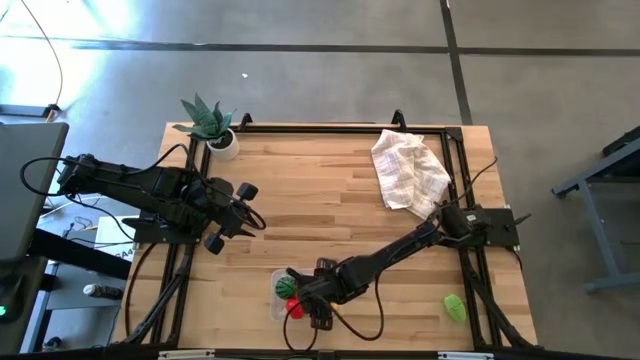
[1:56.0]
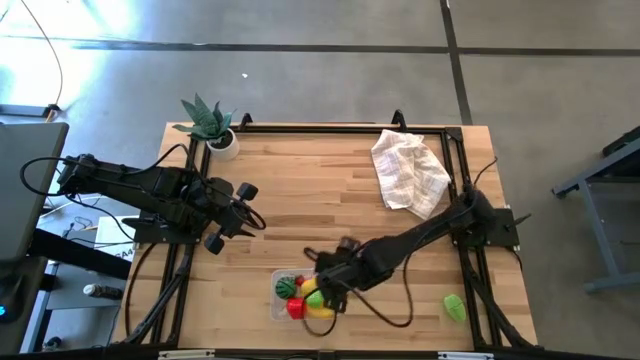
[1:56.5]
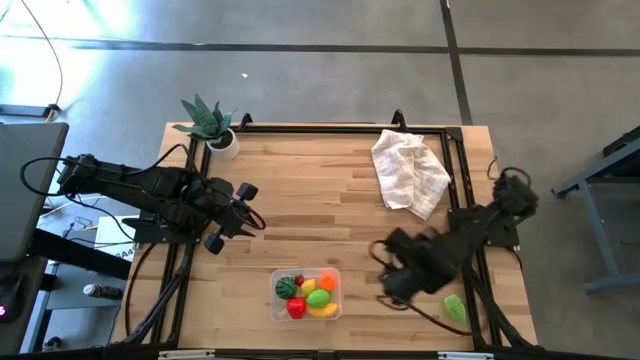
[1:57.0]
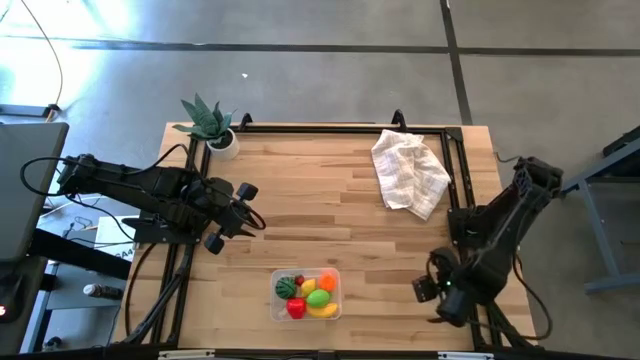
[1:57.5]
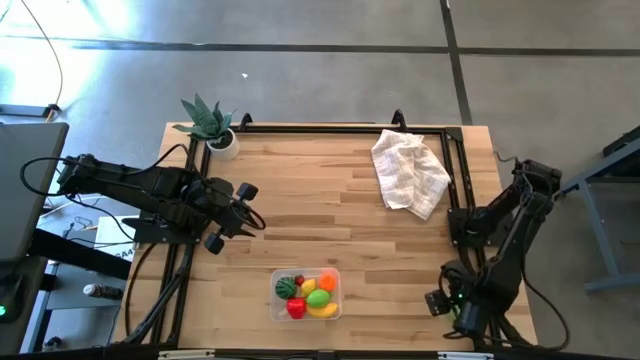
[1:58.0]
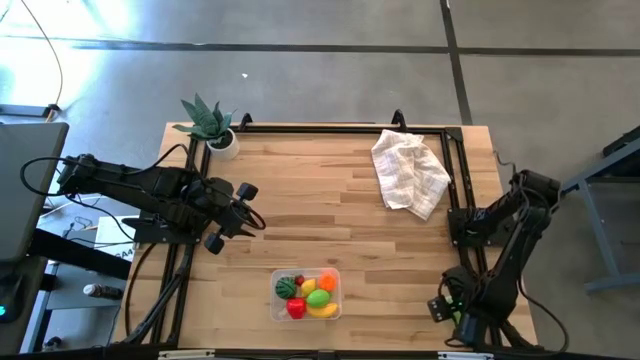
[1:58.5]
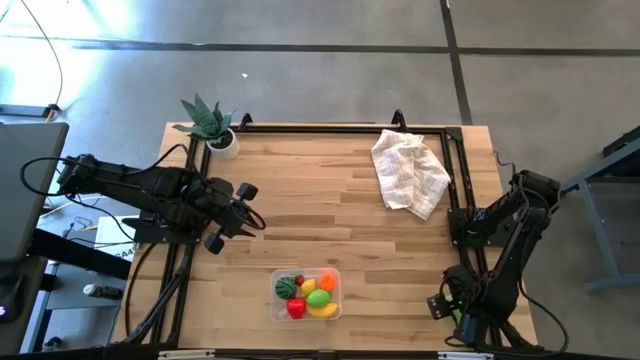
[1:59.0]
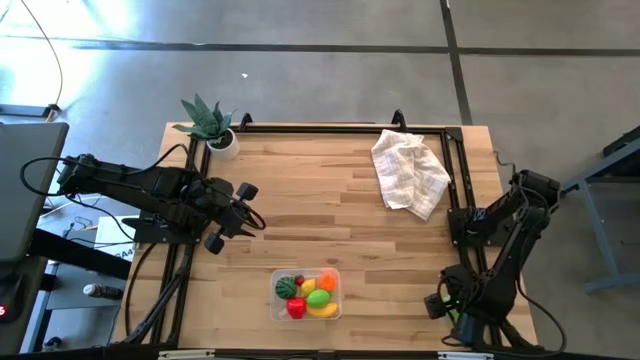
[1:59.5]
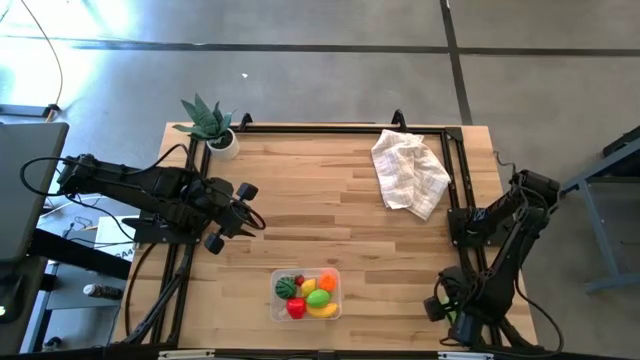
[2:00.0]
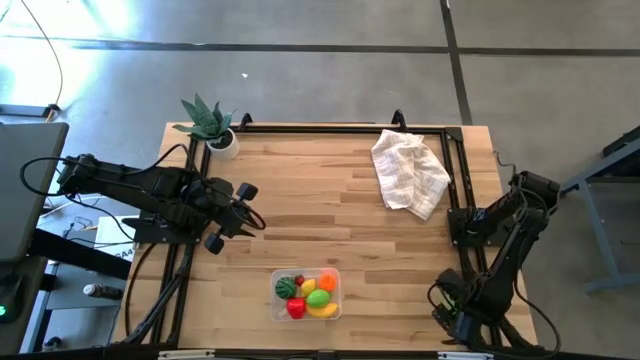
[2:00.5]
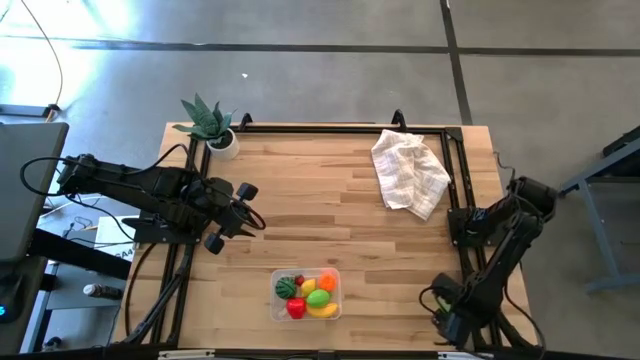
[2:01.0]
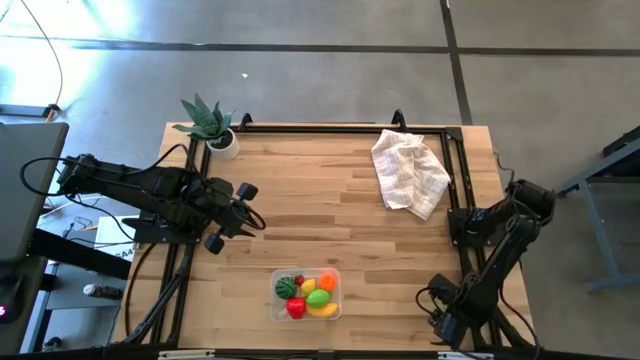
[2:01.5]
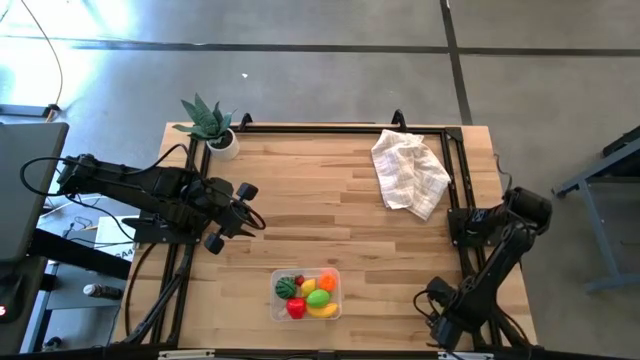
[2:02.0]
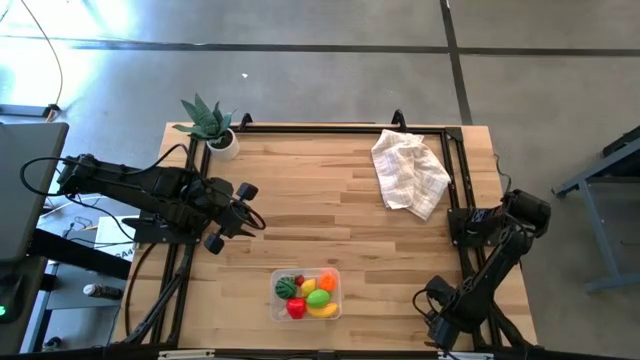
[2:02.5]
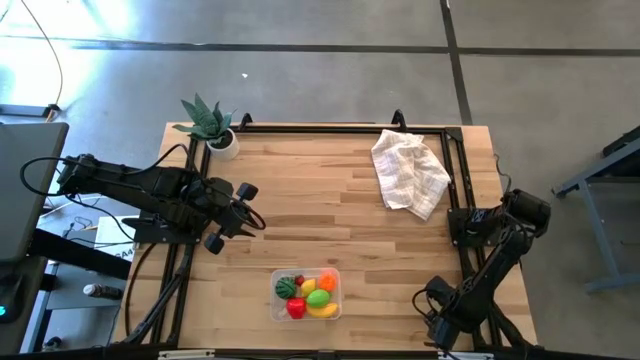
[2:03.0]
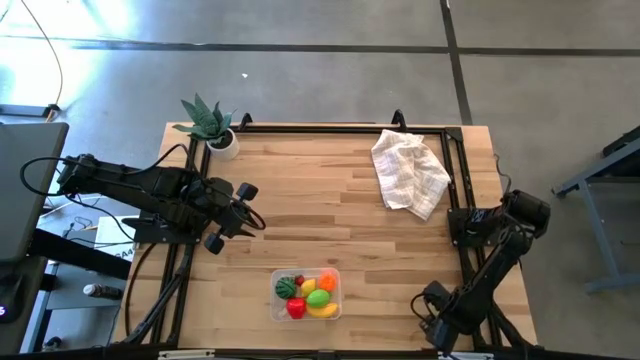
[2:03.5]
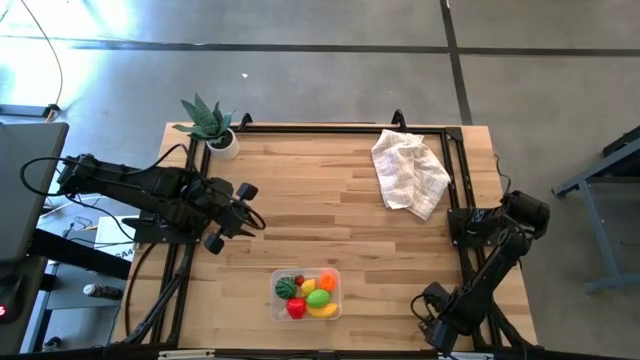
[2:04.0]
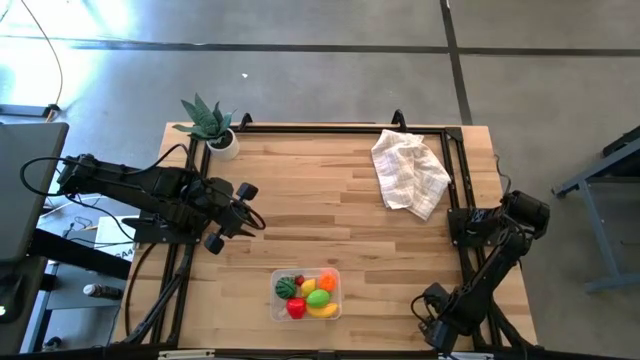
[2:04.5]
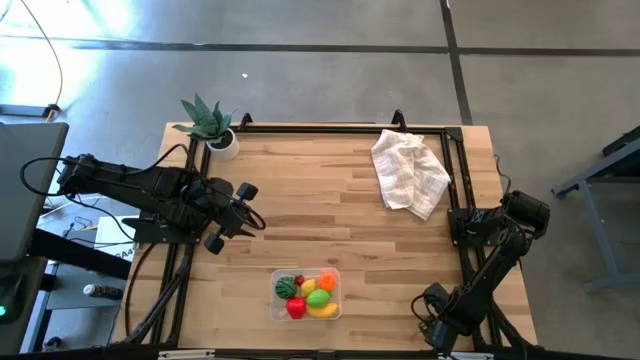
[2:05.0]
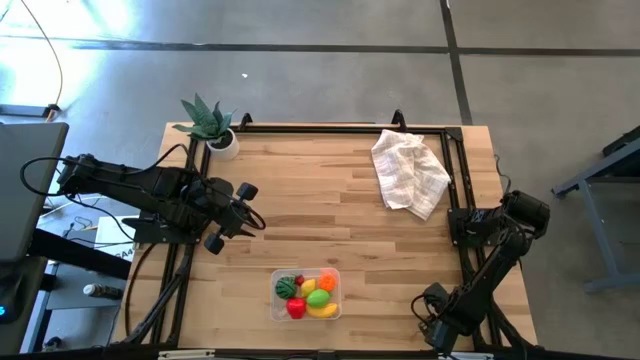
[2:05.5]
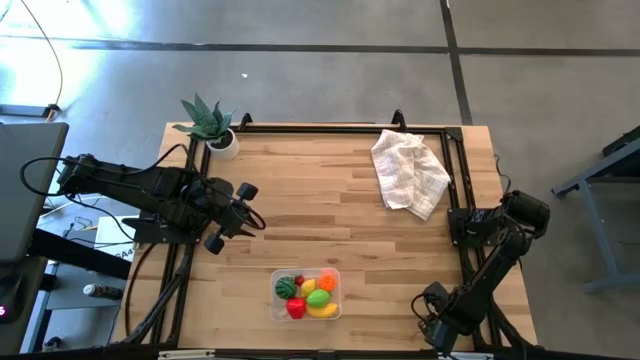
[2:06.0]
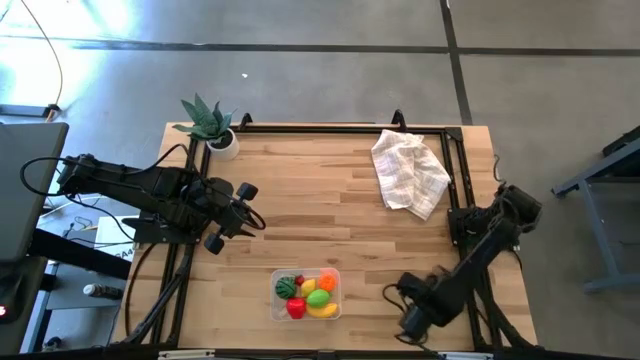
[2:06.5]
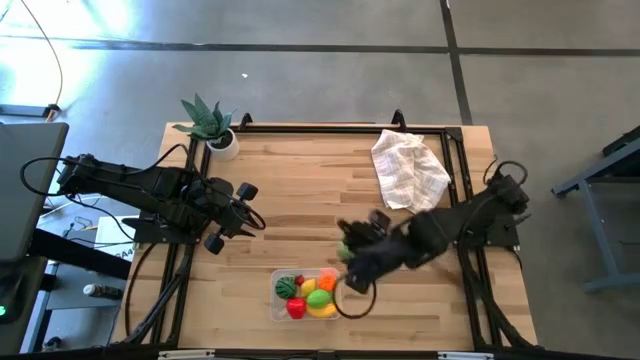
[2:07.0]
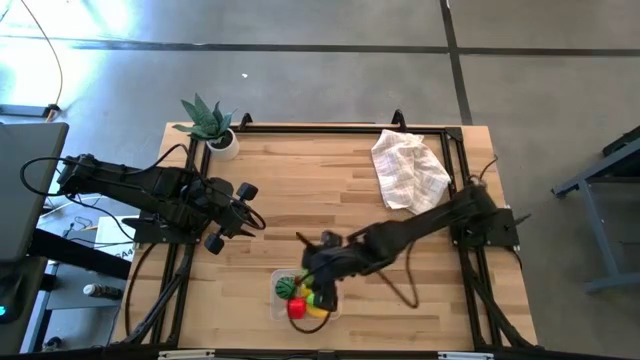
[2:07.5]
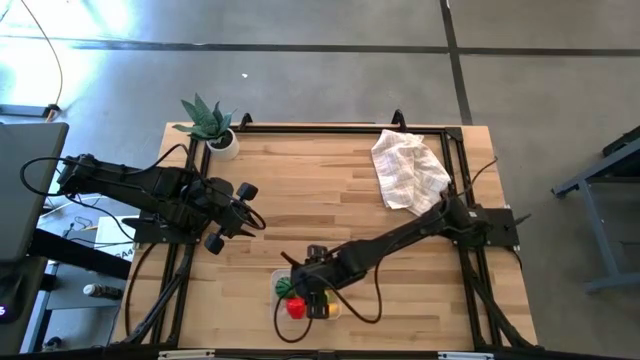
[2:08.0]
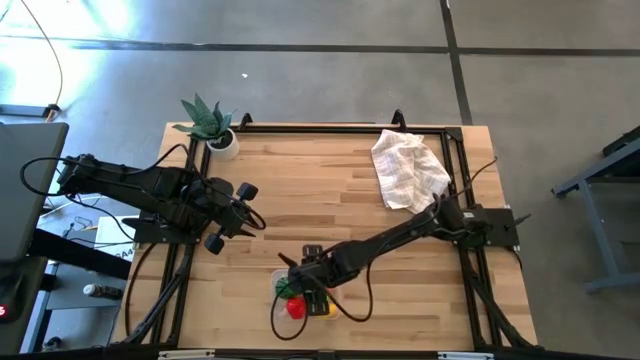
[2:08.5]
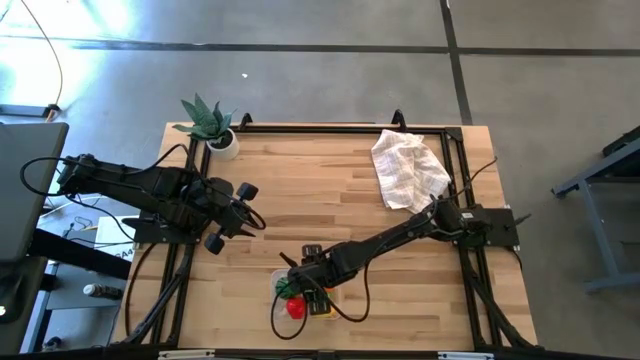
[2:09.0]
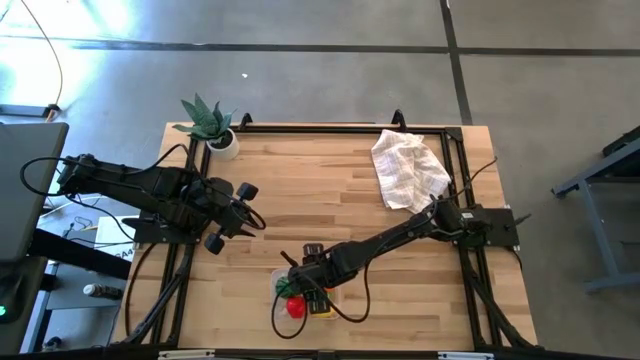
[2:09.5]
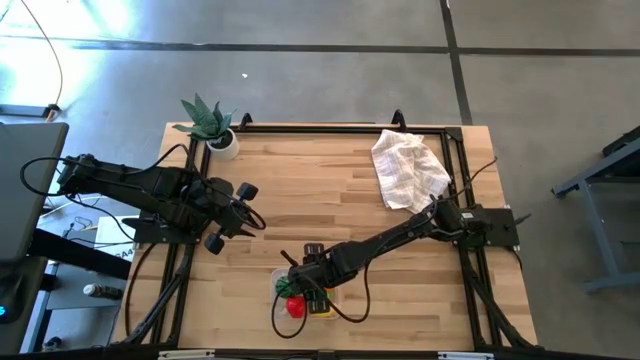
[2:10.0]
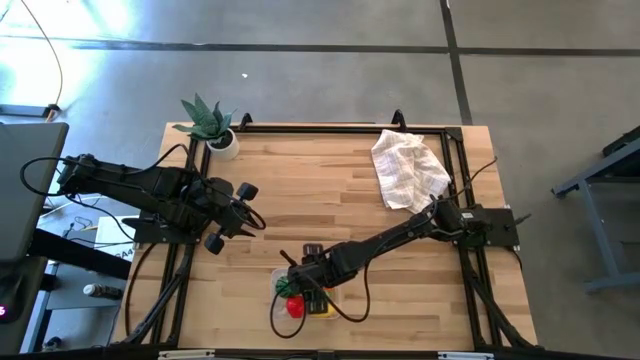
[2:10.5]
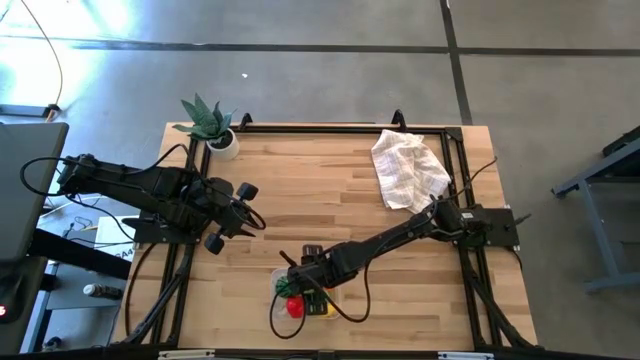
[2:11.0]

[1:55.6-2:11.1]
Task: Pick and placing Produce into tupperware
Put the start fruit into the bin

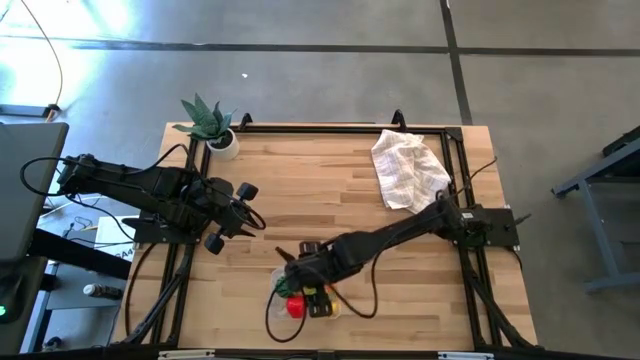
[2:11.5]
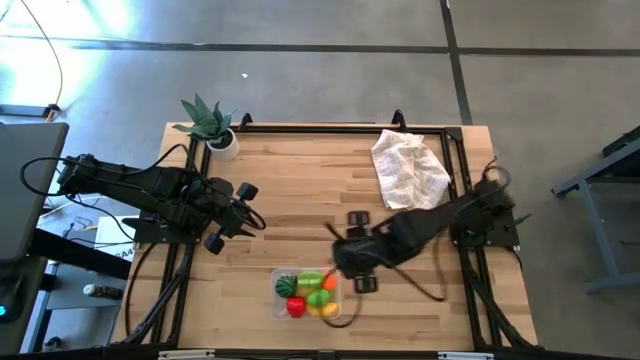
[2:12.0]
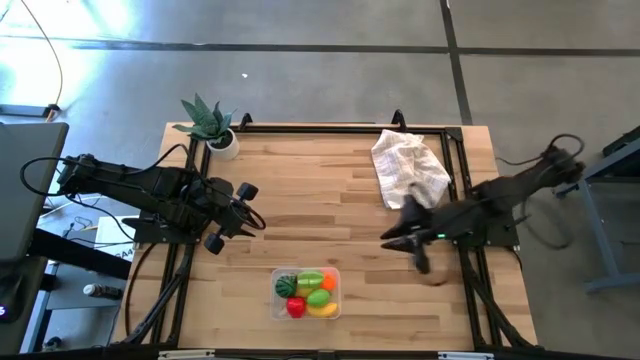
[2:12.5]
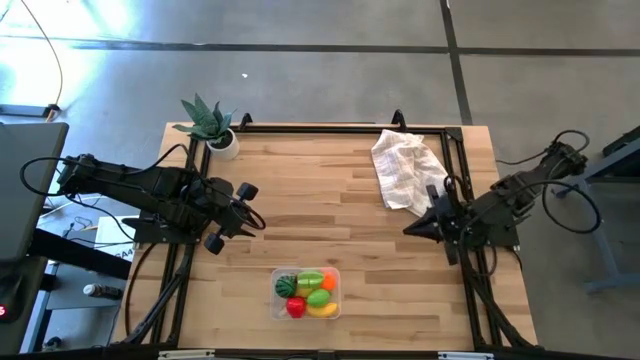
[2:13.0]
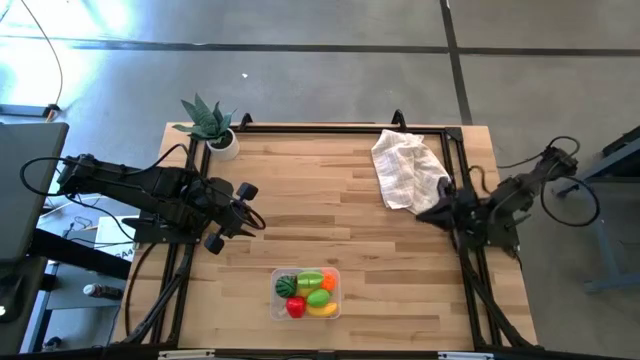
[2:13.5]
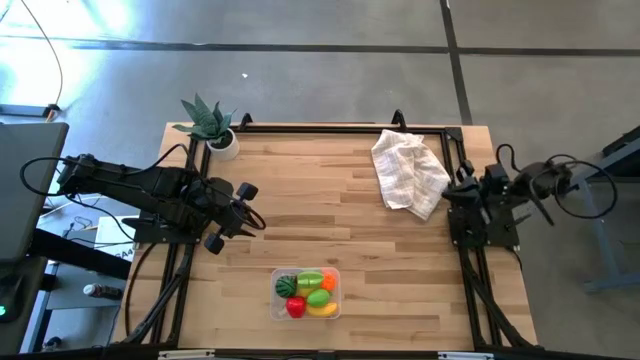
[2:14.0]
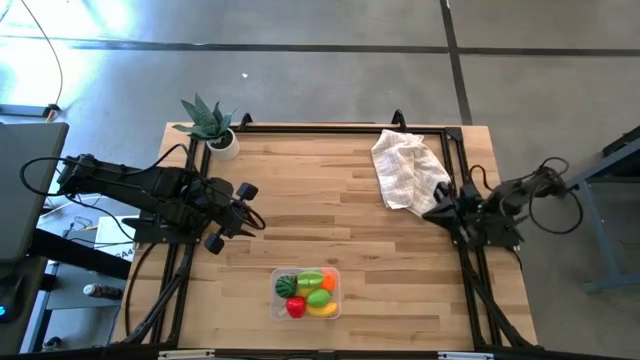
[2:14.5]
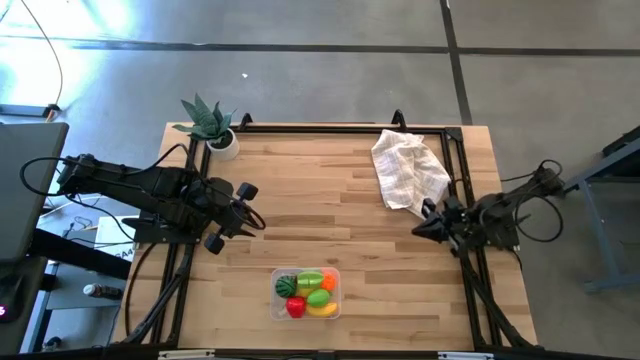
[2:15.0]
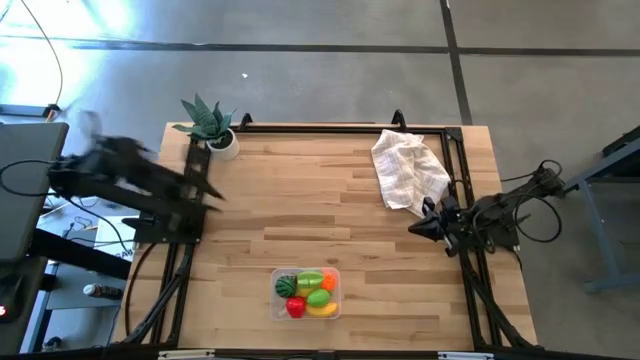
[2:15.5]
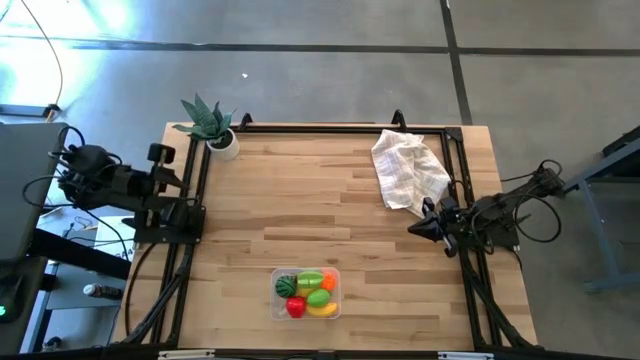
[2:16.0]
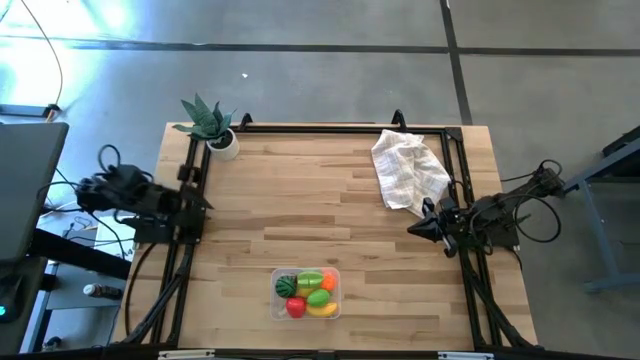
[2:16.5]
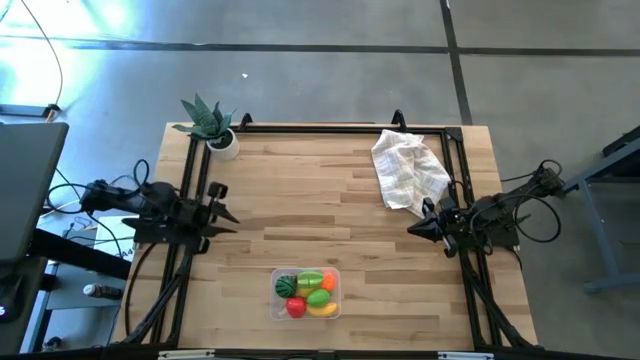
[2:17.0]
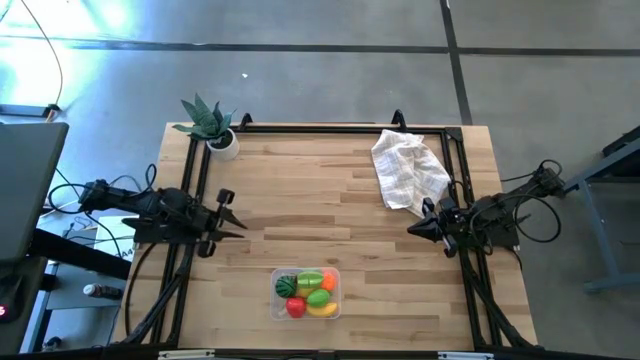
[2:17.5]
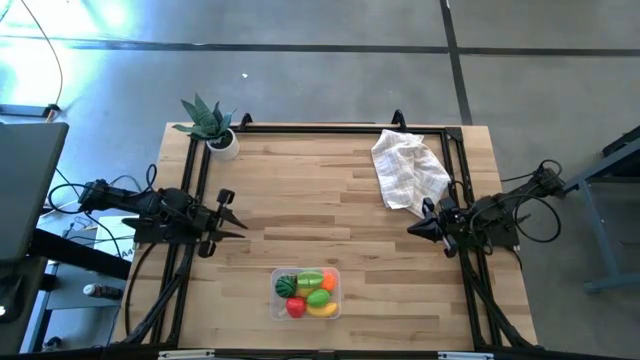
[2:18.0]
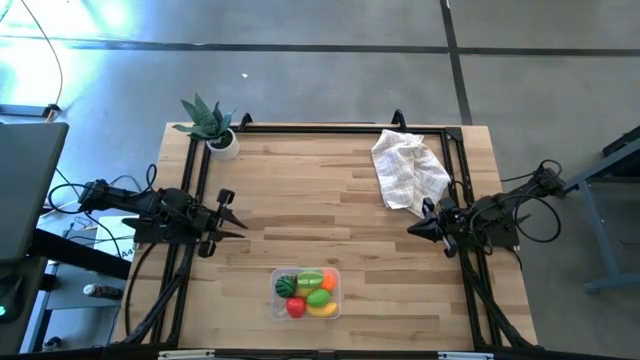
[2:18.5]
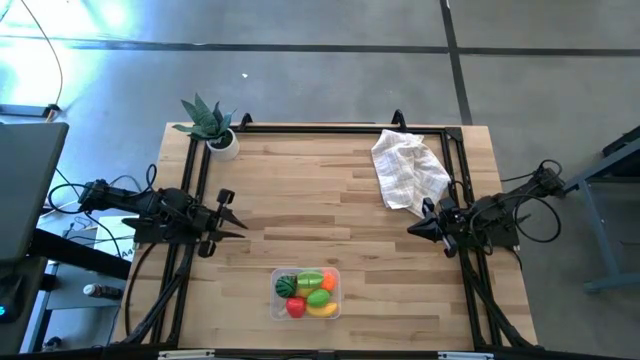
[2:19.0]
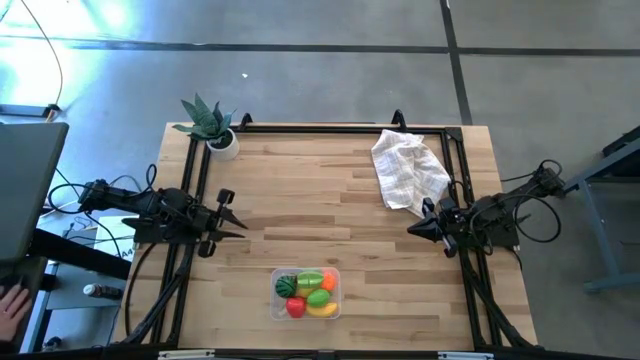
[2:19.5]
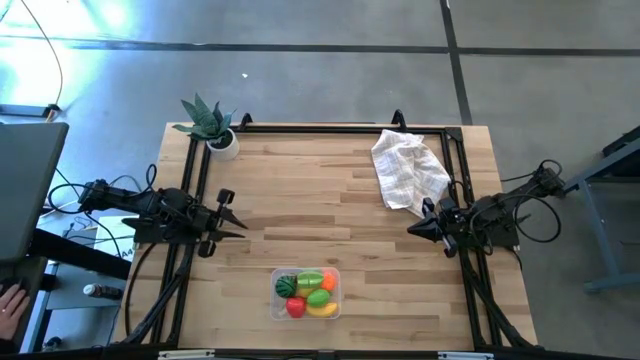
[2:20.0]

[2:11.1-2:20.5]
Return to Home Position
